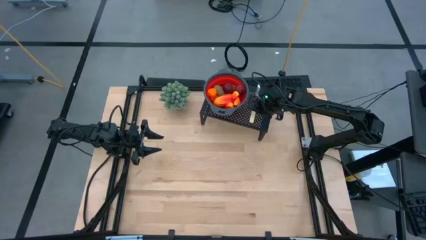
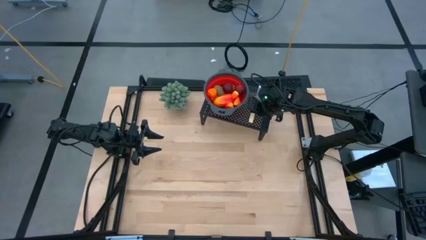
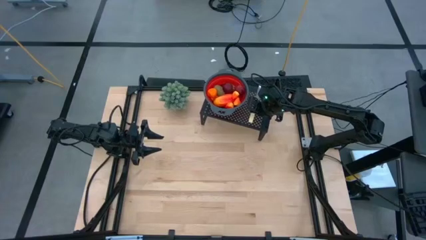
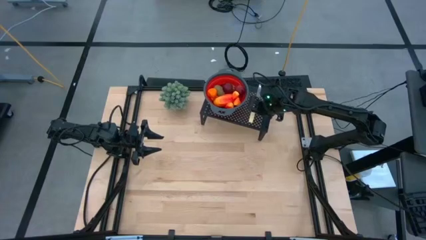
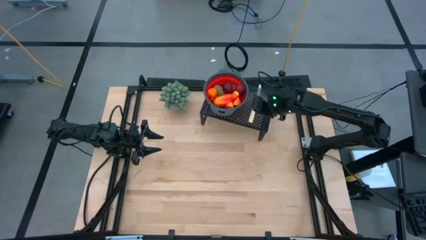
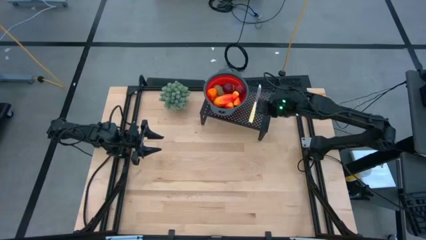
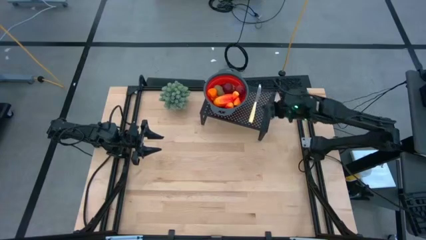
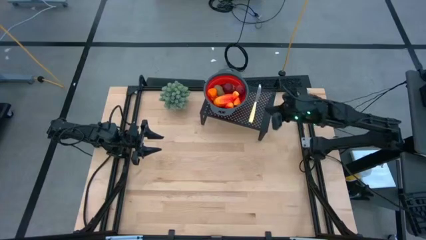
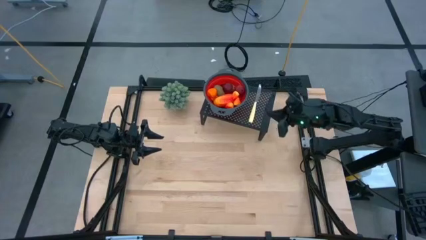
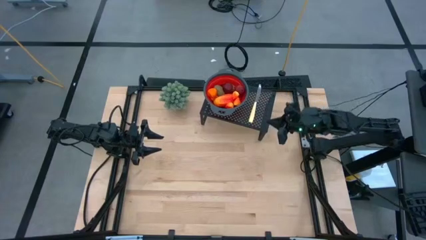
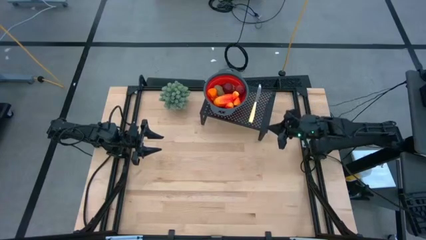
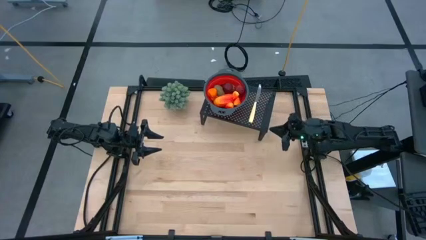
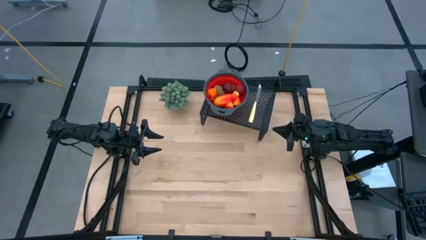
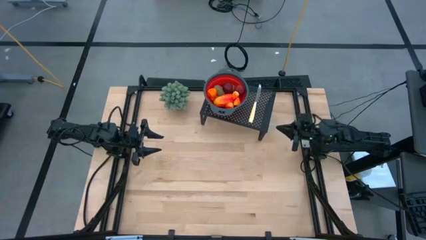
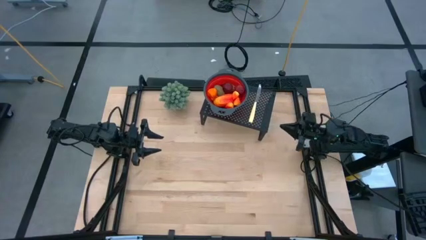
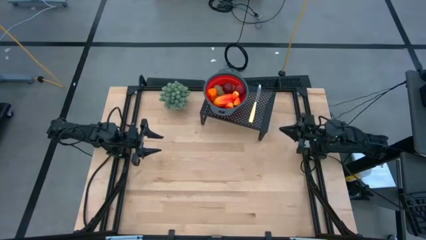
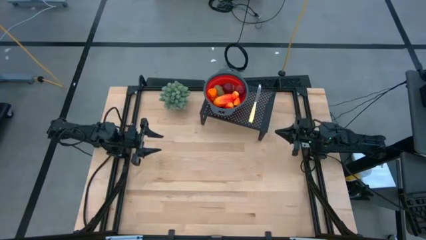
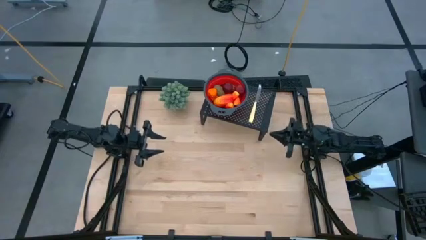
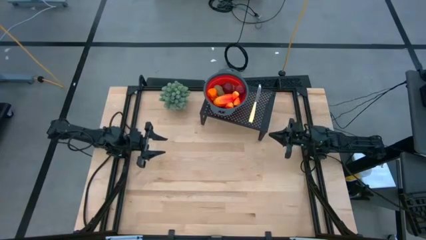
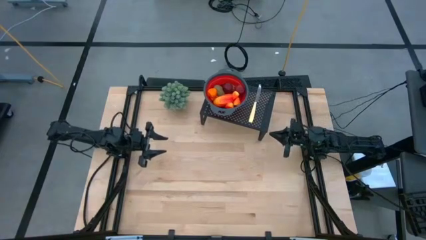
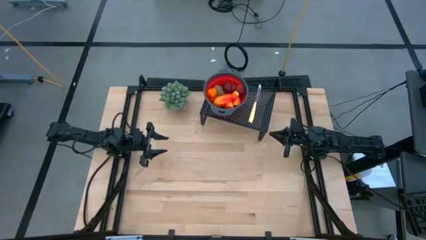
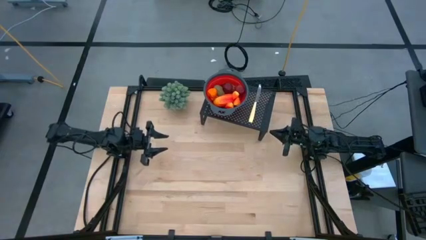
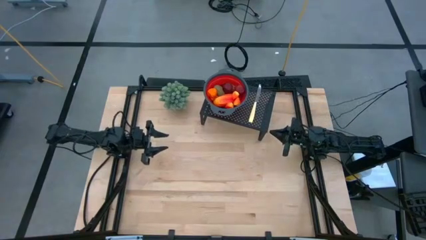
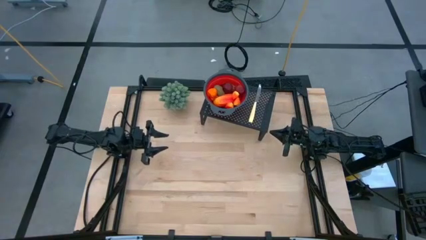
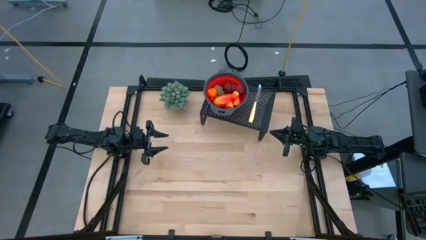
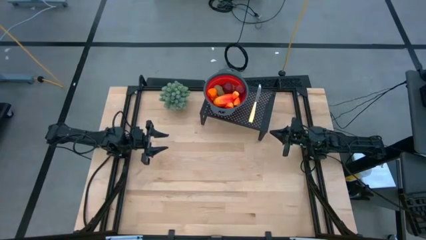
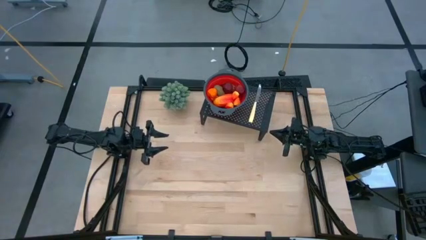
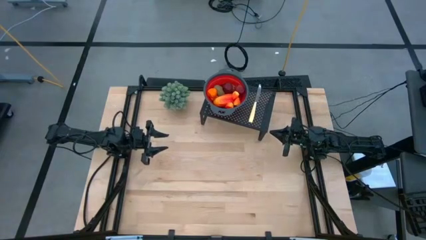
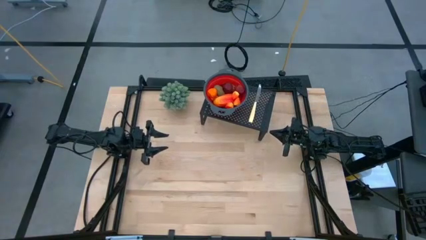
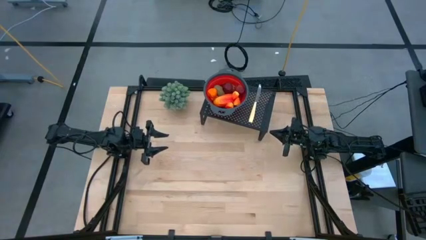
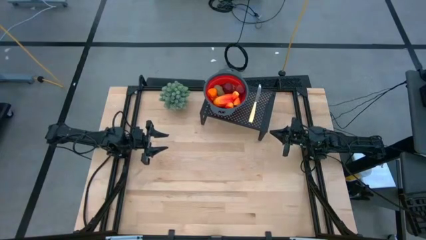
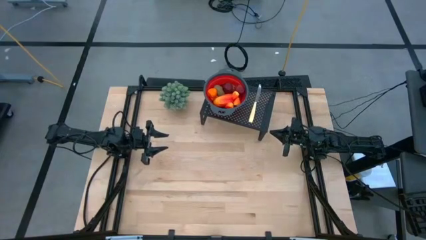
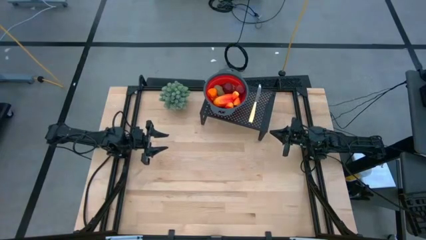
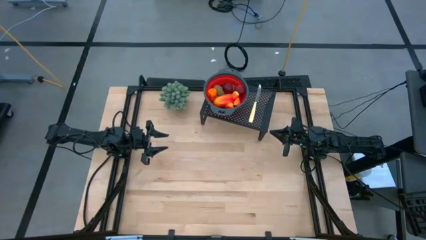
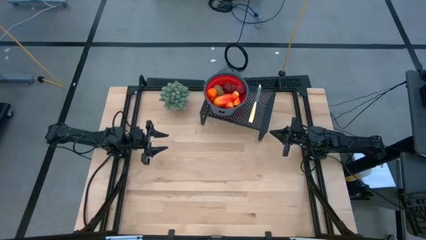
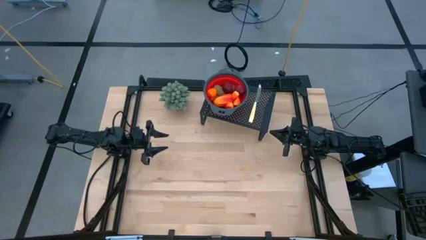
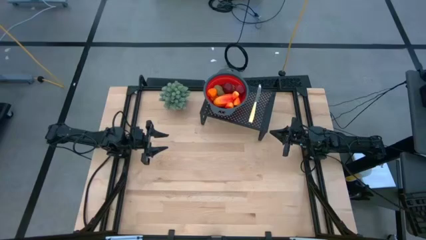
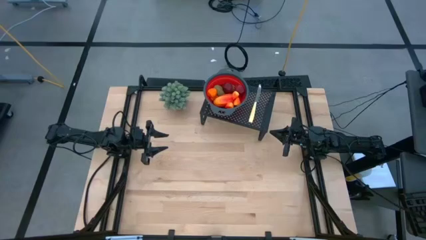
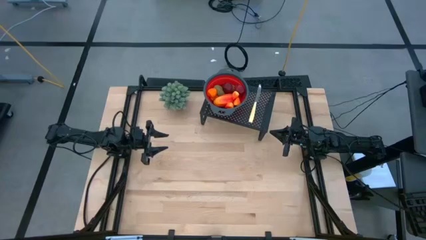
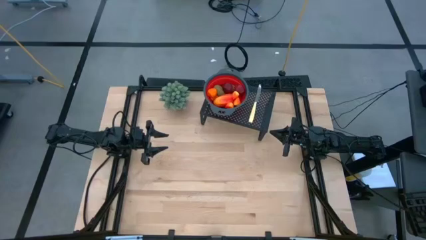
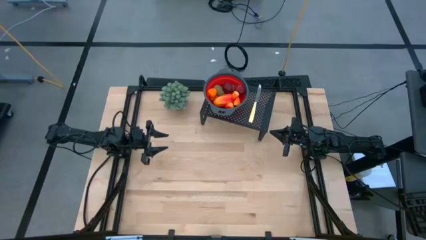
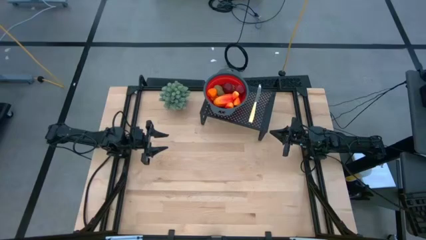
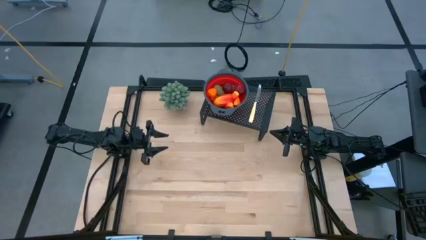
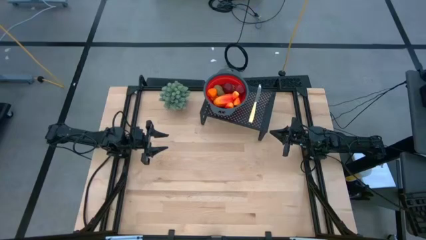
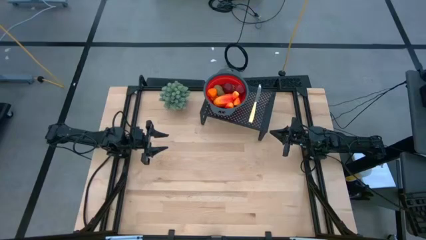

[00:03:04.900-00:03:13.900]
Task: Pick & Place Fruit
Return to Home Position

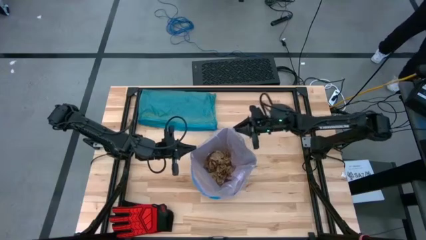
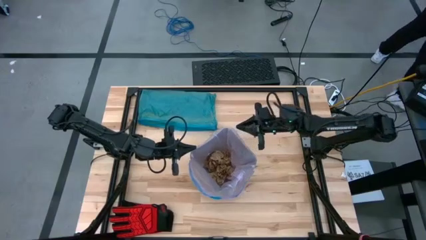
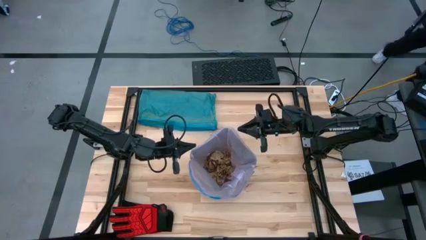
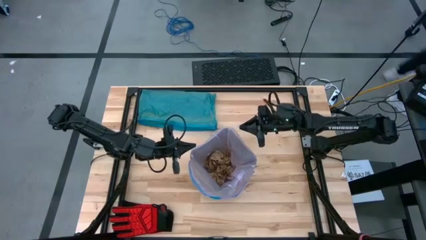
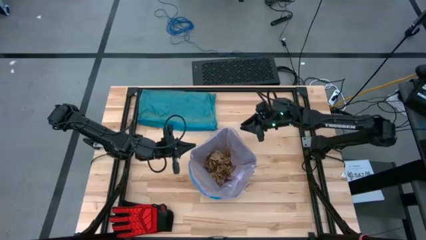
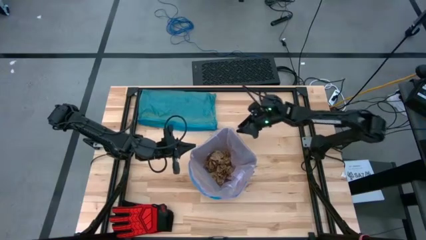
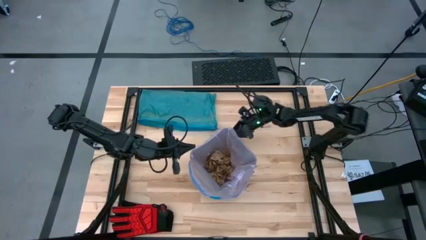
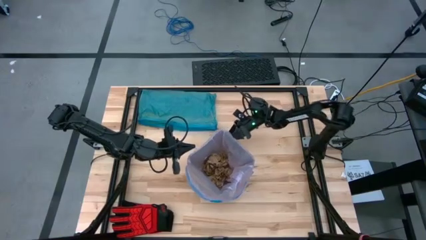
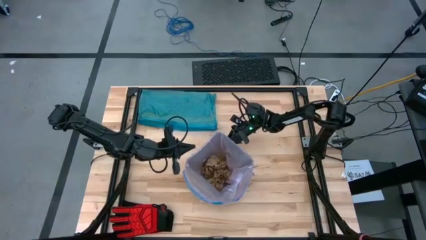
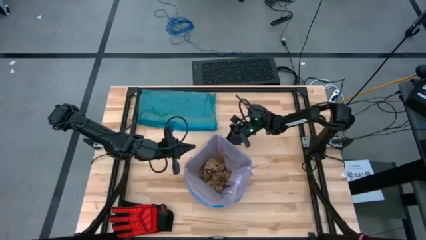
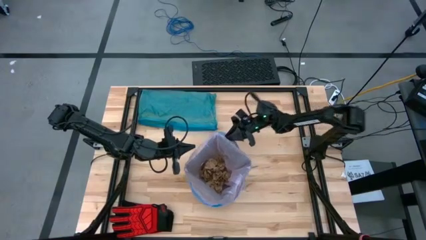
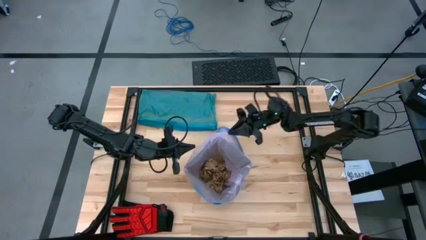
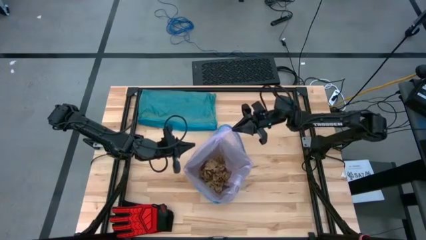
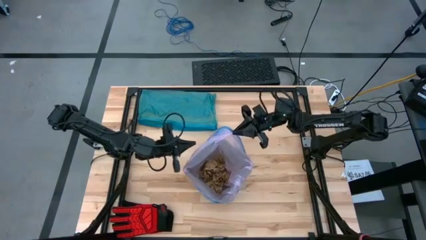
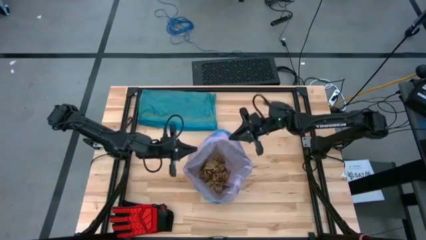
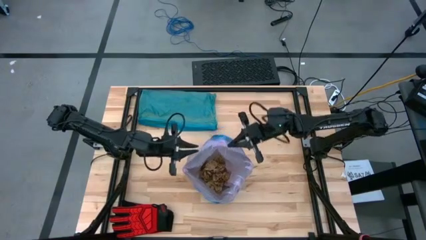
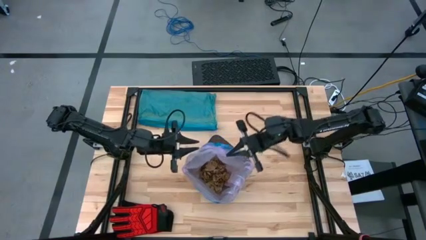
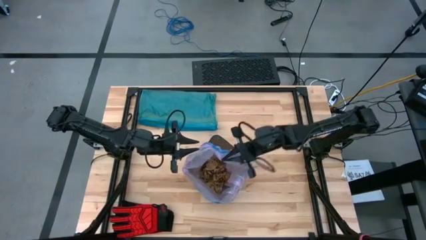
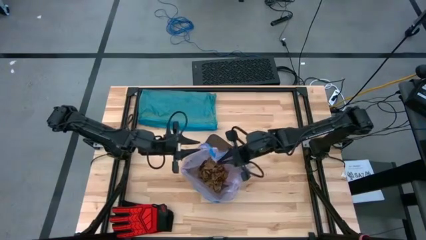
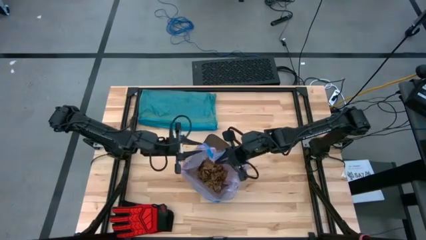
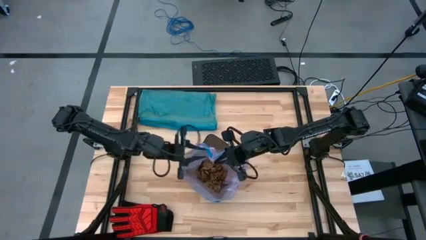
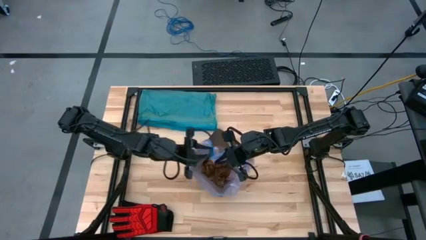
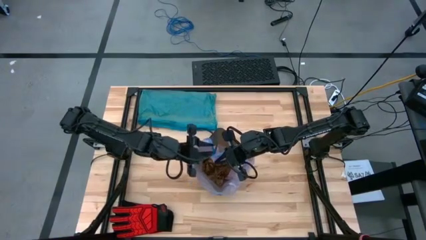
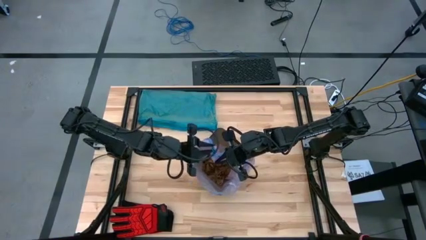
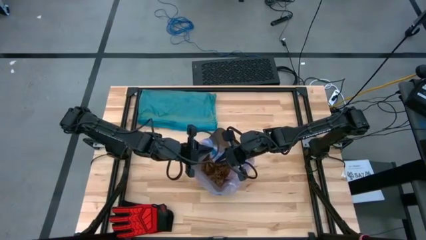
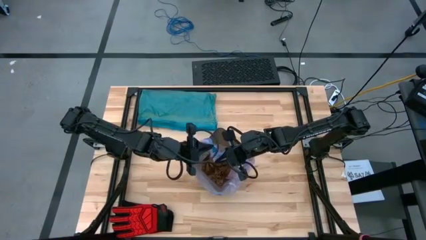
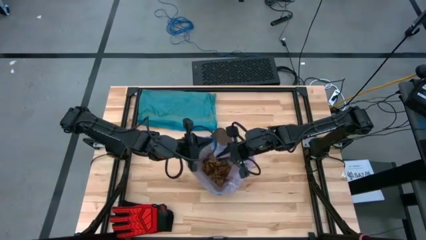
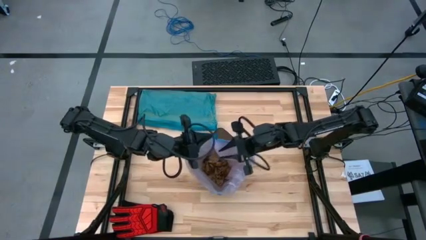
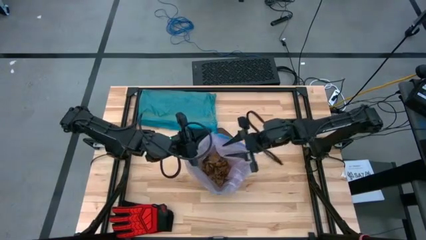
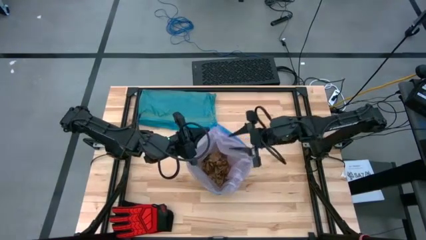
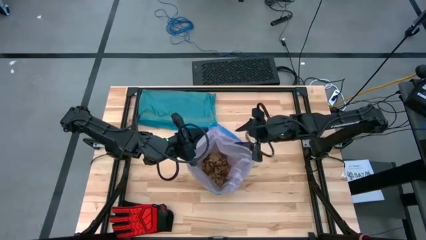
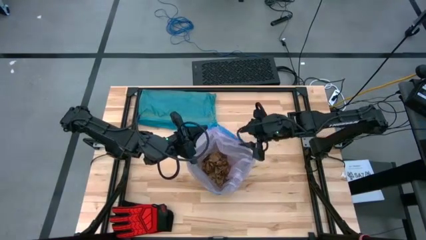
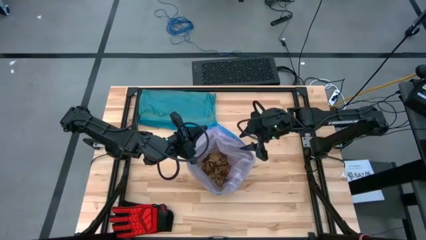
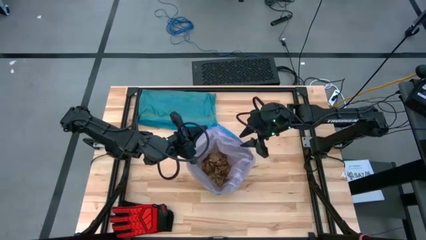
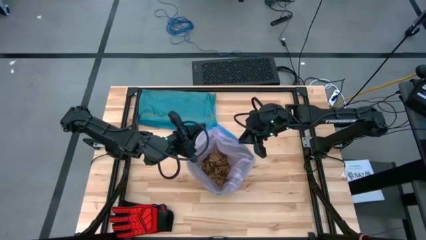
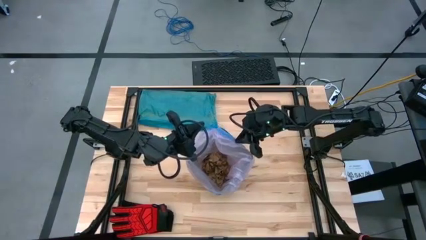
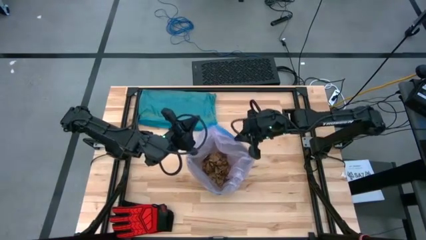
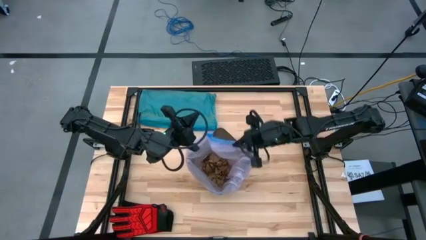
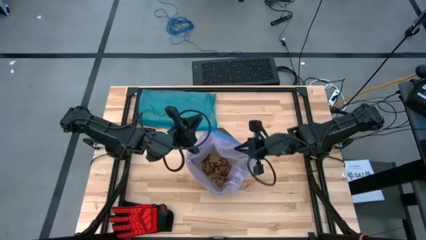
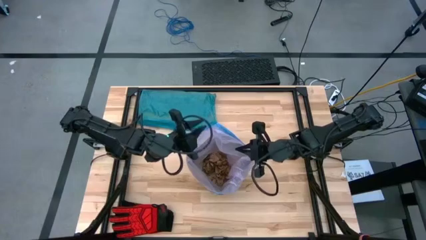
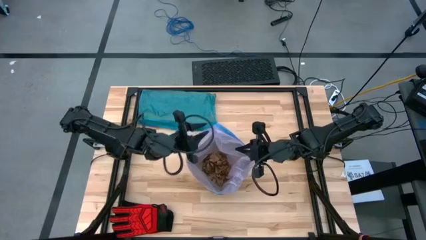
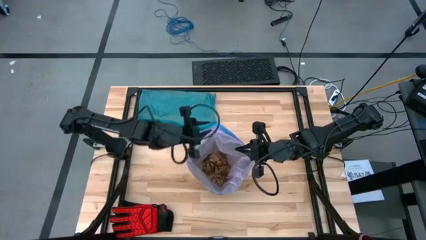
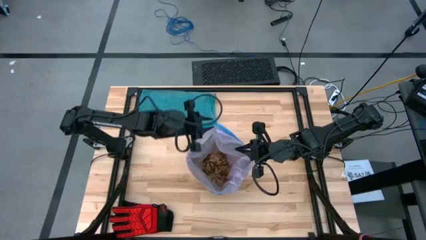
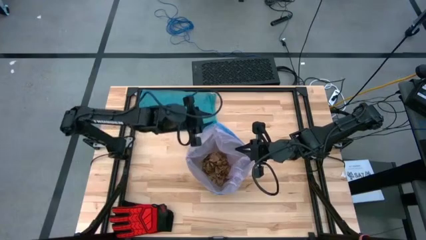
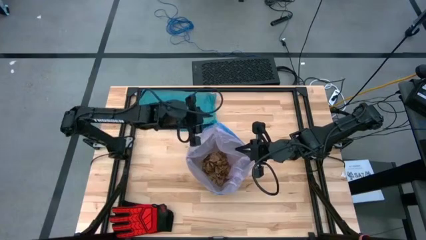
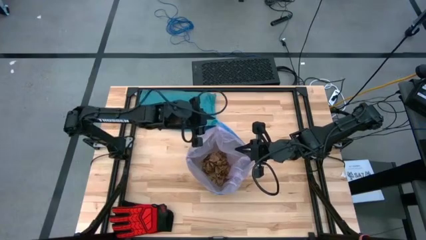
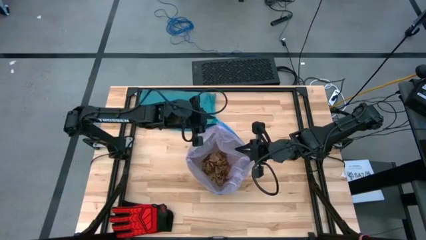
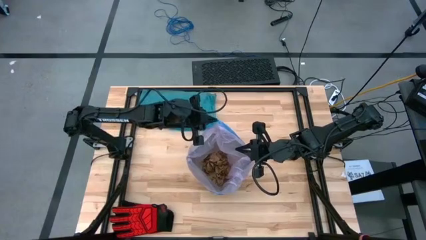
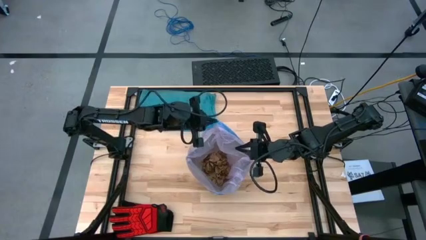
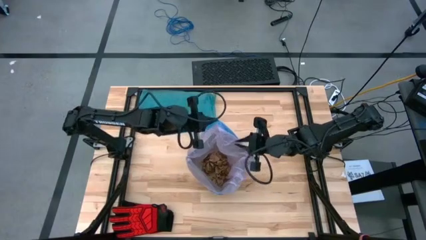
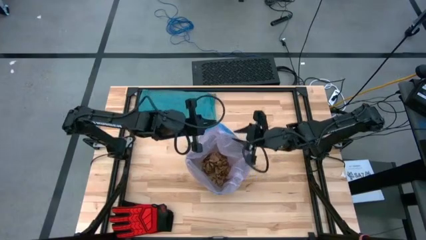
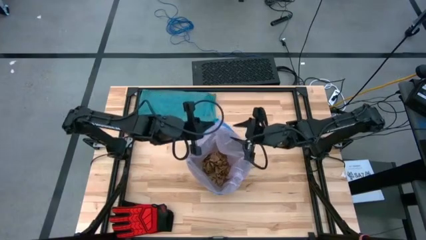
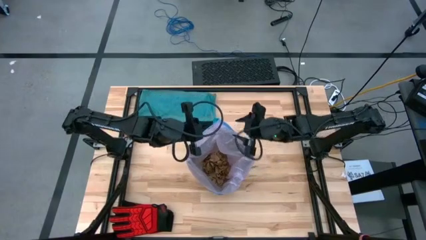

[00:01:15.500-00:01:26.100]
Task: place trash/remove bag and relplace
Remove the trash bag from the trash bin and put it on the top right of the table
